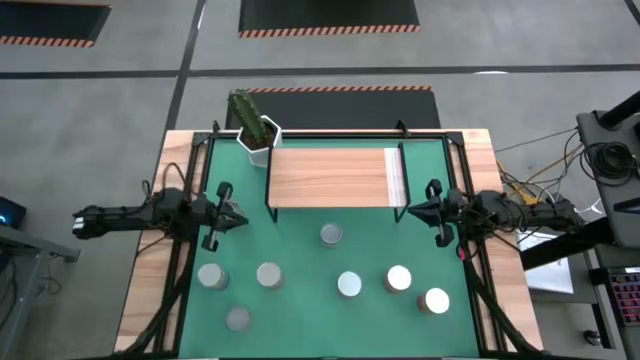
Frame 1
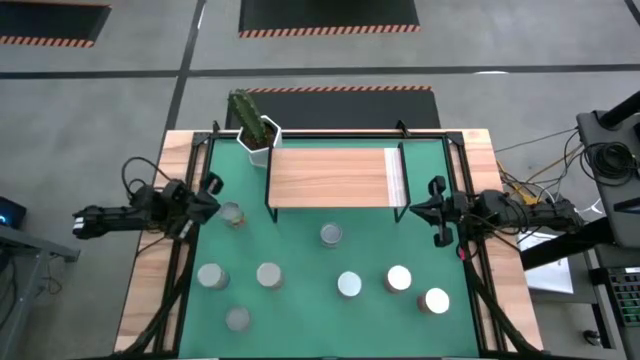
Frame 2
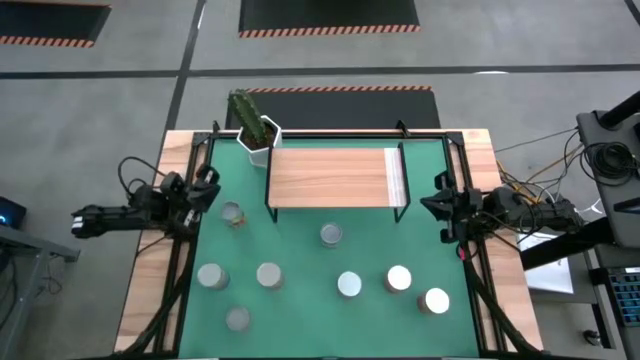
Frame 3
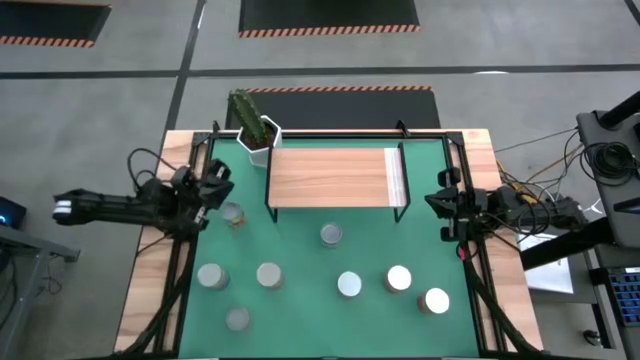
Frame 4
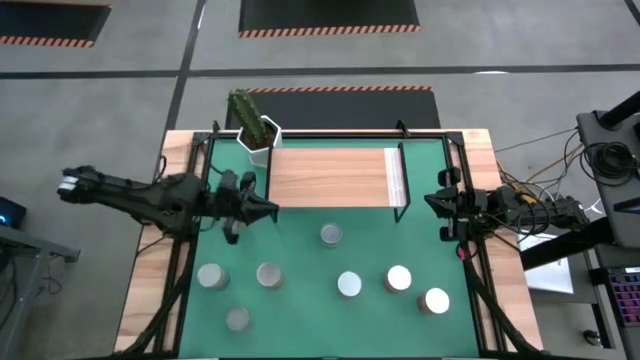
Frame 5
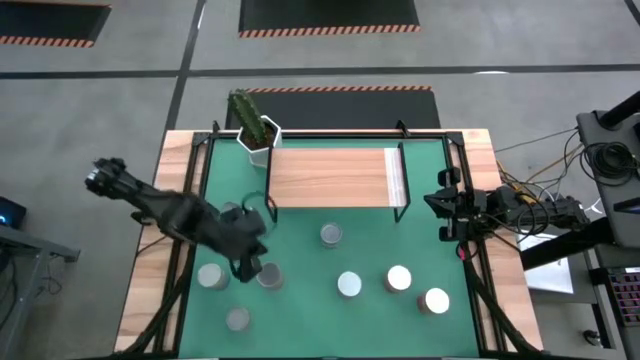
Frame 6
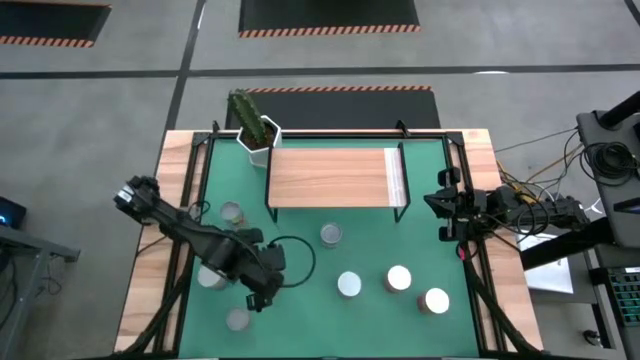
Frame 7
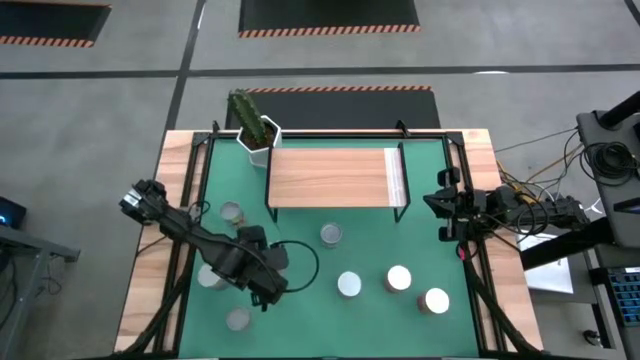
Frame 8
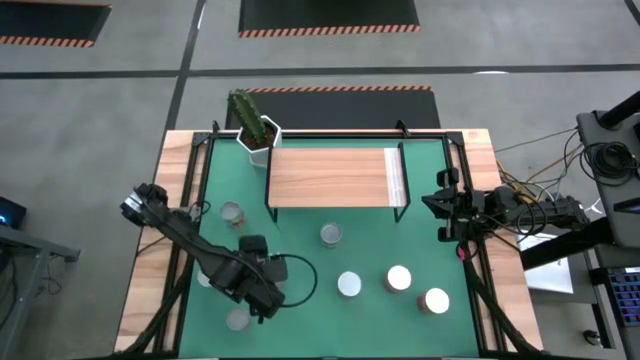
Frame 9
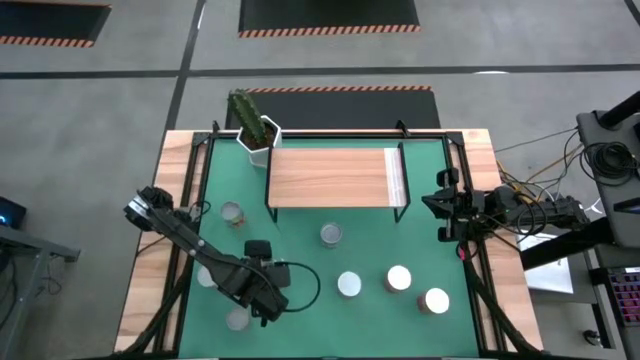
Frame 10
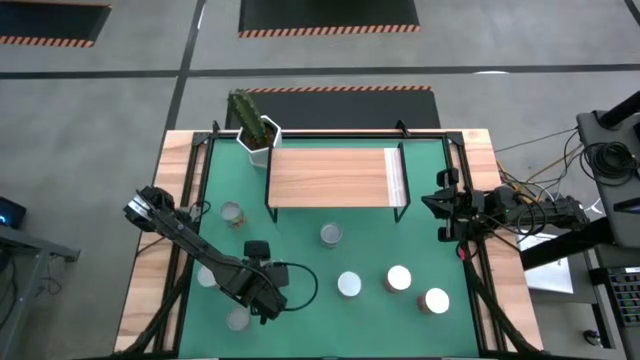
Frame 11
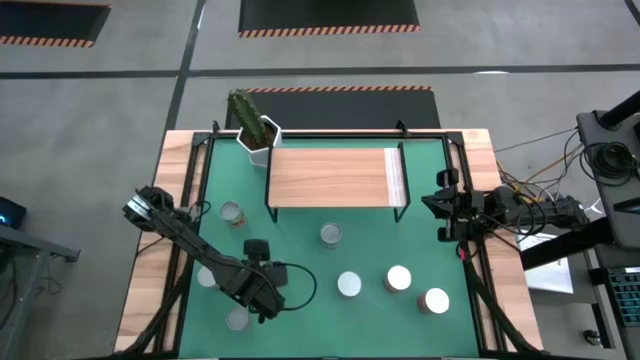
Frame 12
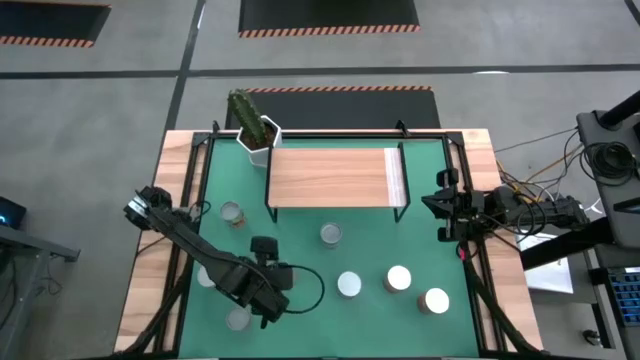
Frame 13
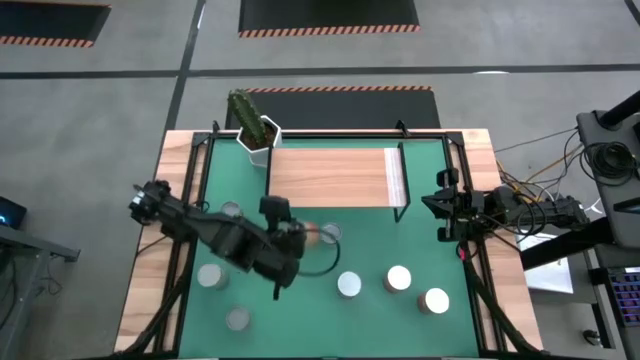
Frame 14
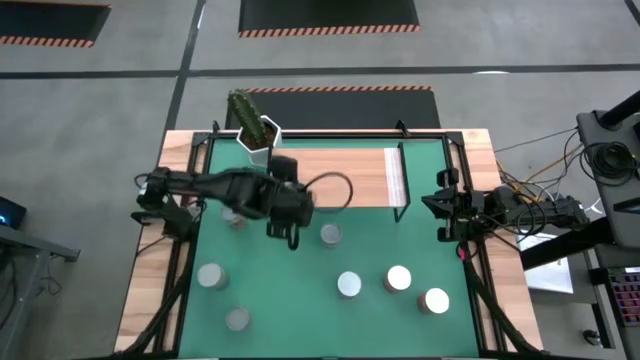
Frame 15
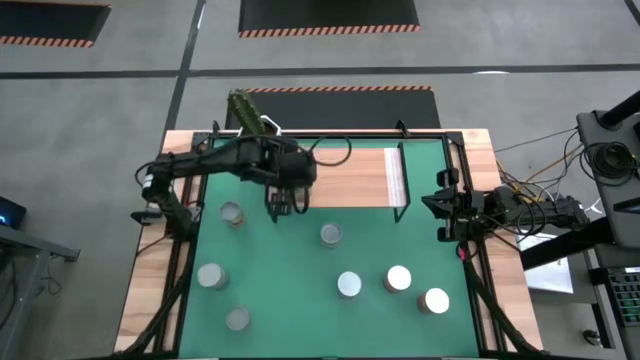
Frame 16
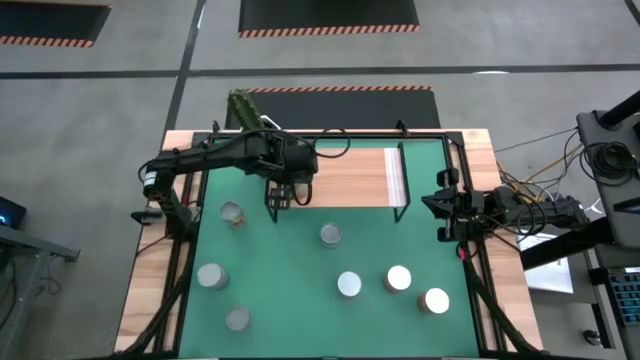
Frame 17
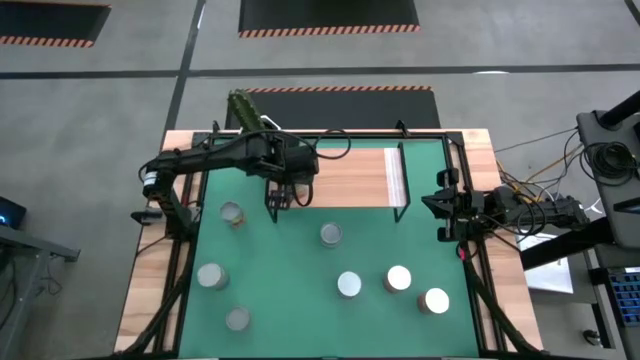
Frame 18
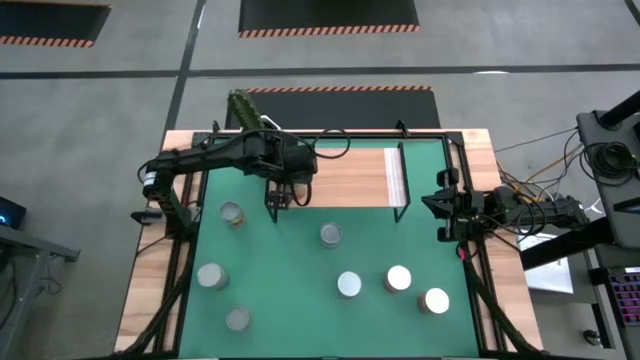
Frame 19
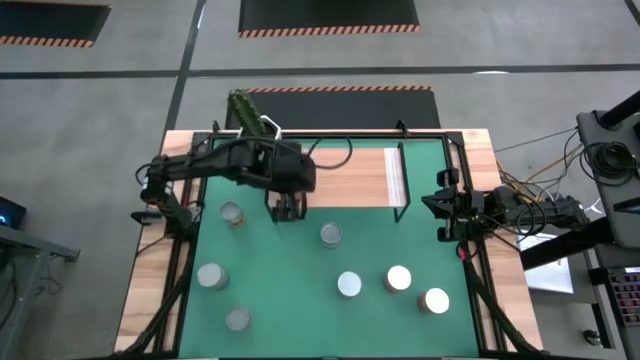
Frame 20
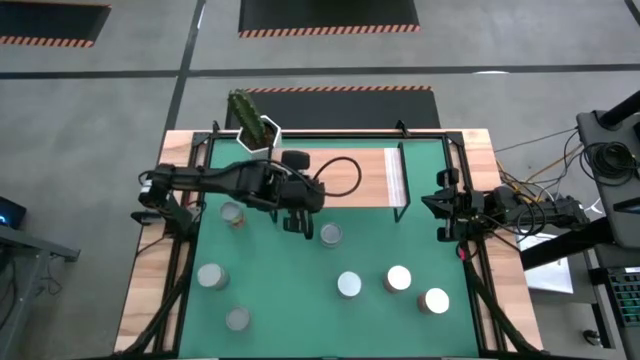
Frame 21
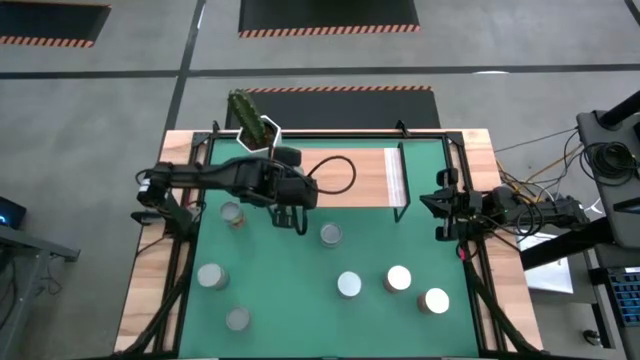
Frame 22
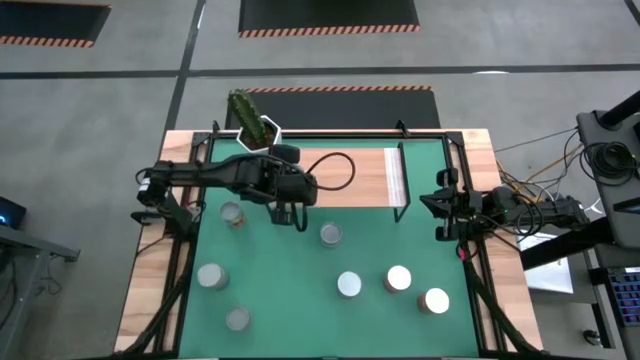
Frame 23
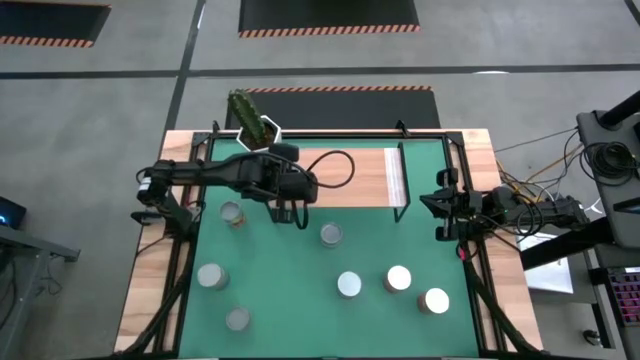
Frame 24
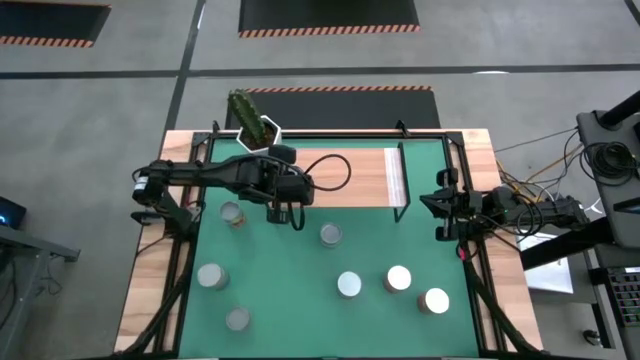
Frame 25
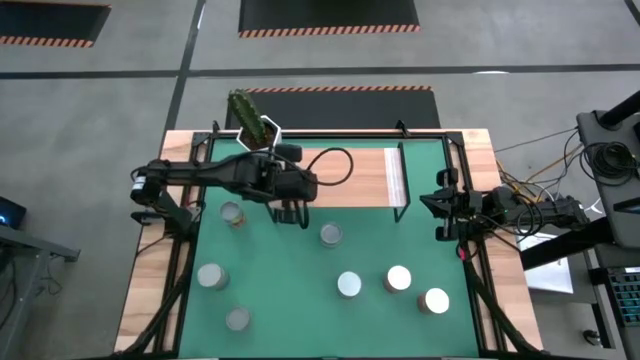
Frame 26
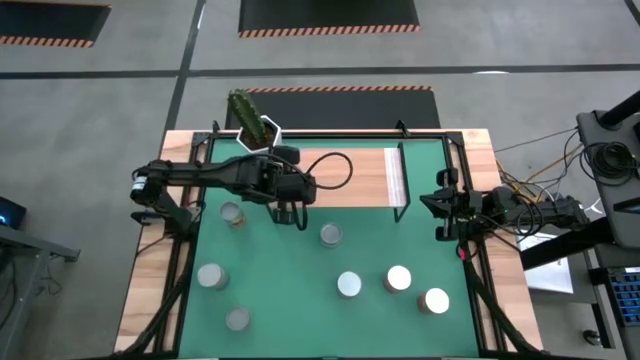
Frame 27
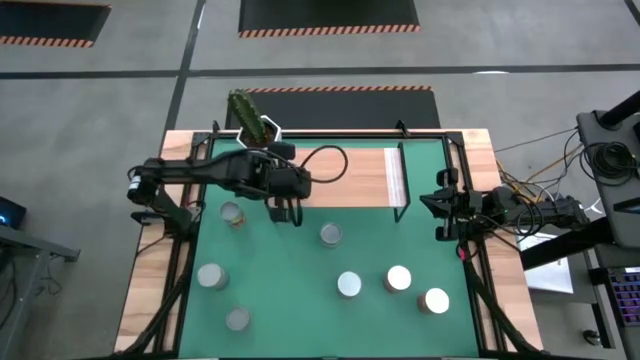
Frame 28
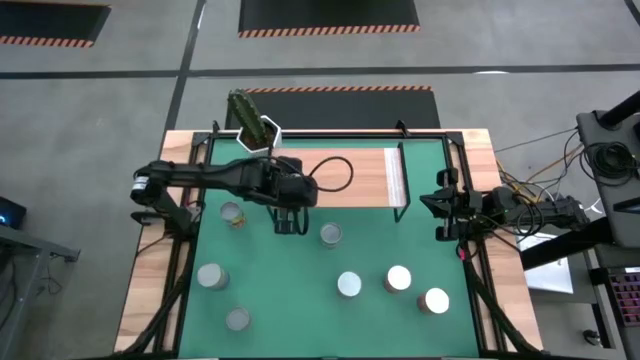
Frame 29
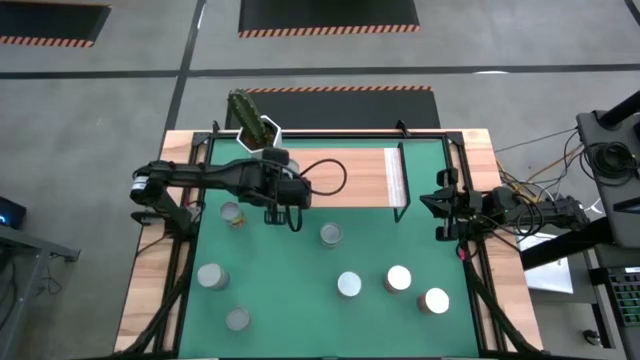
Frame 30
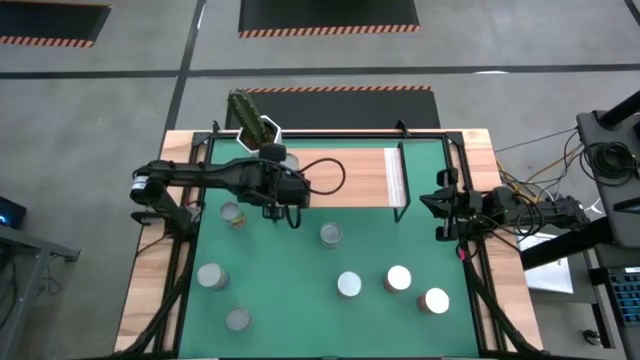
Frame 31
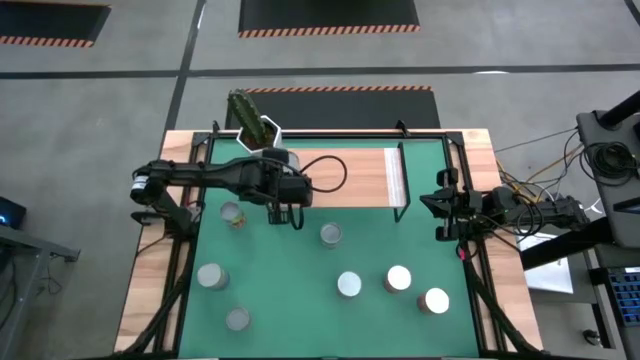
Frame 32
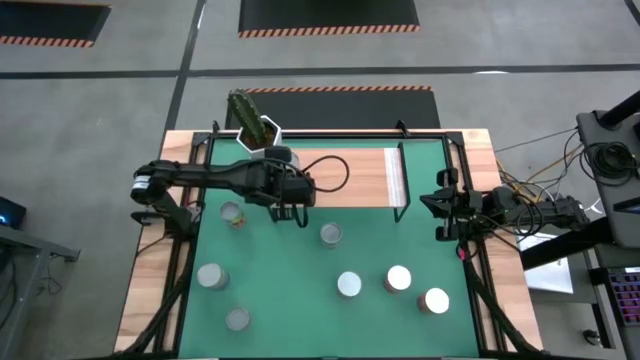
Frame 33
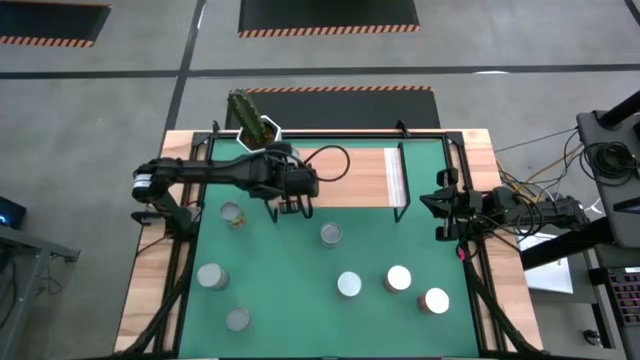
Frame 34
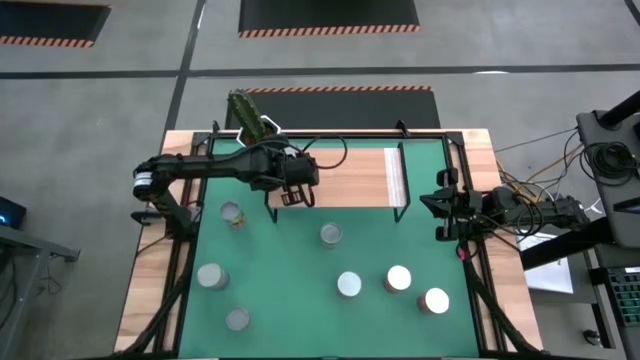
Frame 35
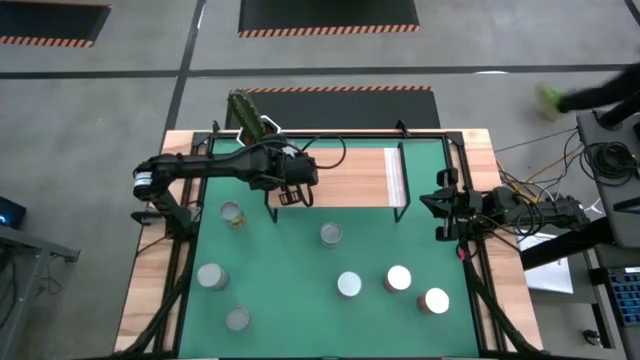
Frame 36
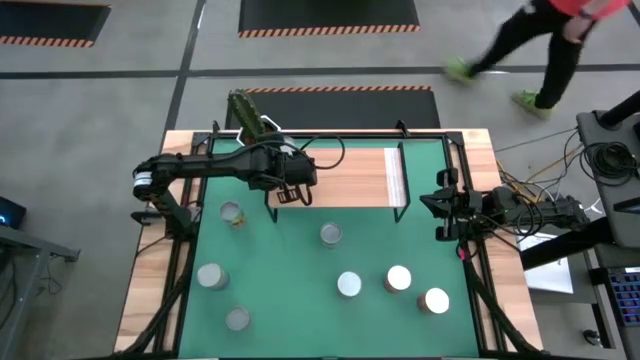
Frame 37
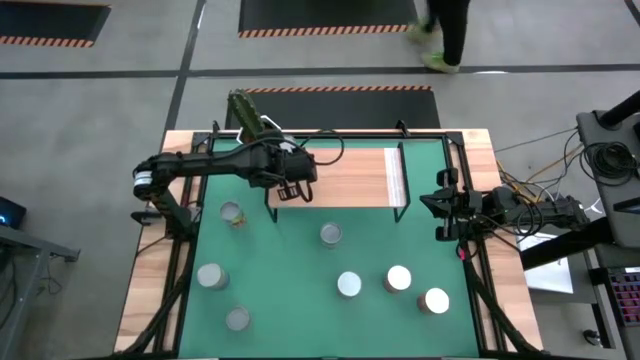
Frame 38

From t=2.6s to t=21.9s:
Task: Pick and place cans onto a shelf
Put the canned green beans on the shelf

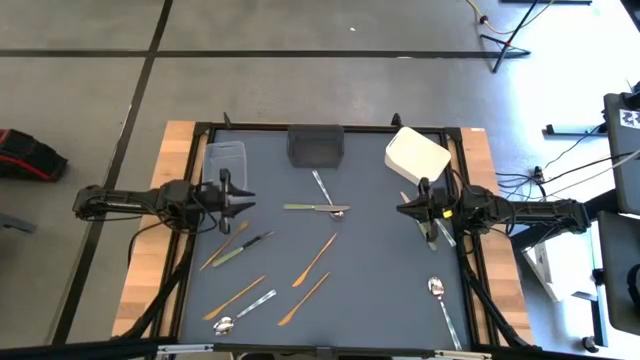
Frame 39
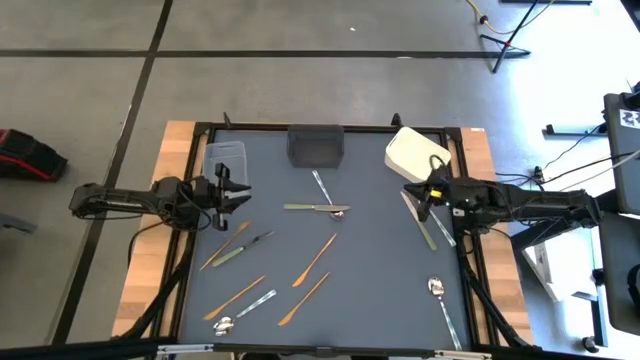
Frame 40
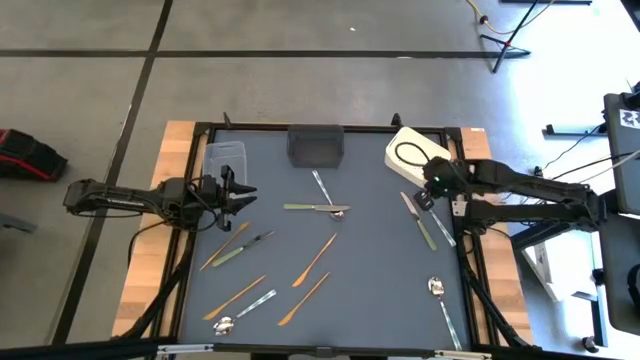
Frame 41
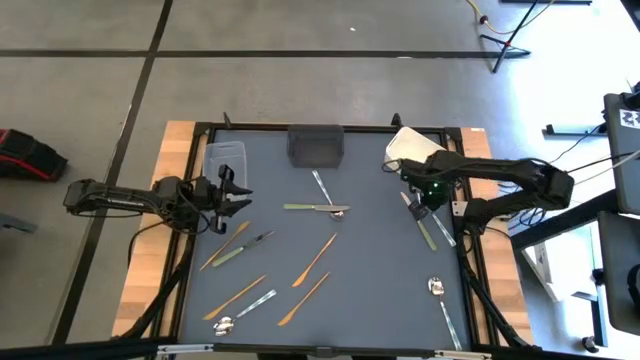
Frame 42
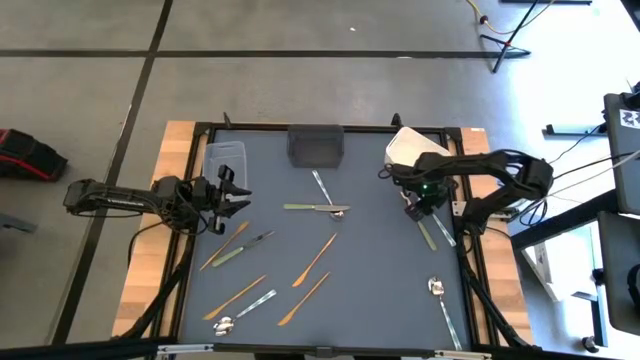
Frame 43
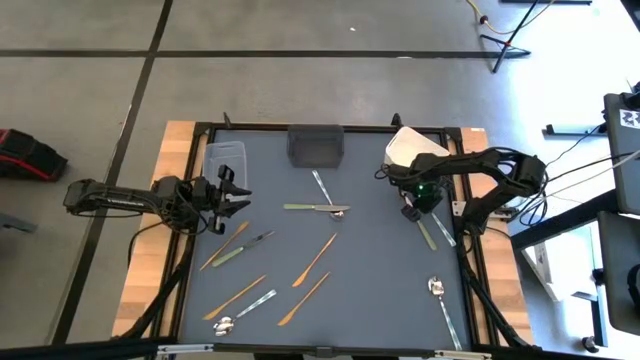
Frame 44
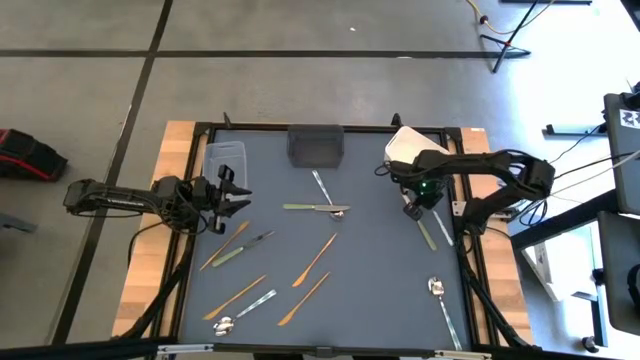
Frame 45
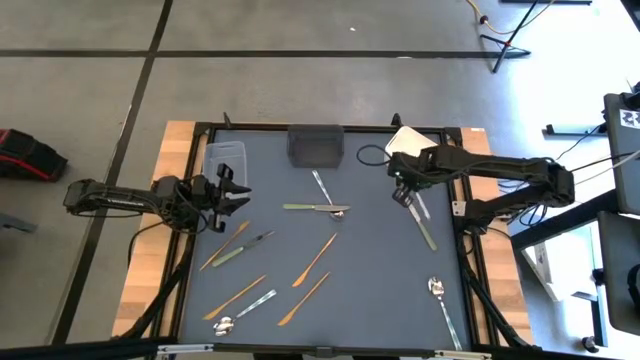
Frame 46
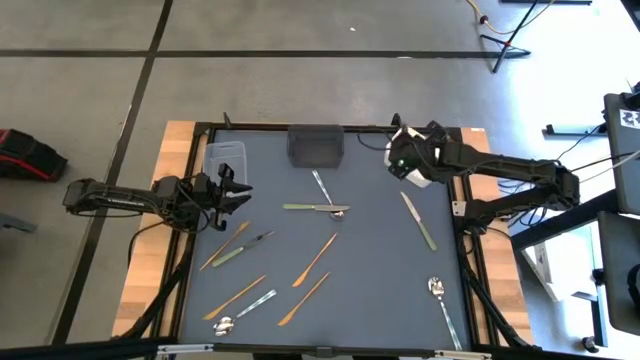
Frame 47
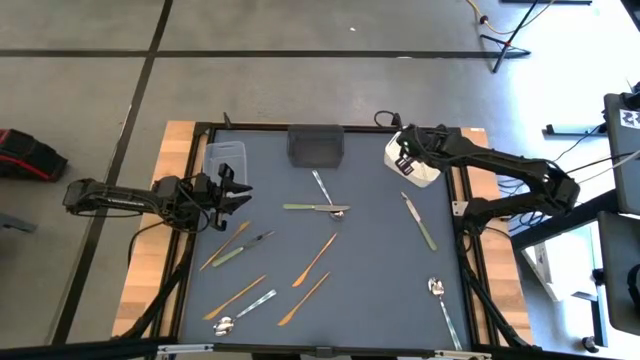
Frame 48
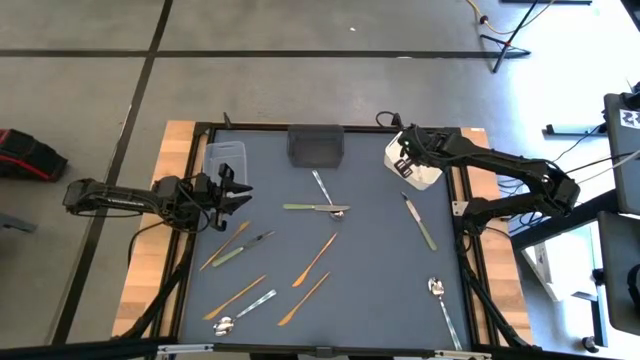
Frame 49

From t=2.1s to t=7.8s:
Task: Sort silverware by color (type)
Put the top right blue spoon into the white bin
